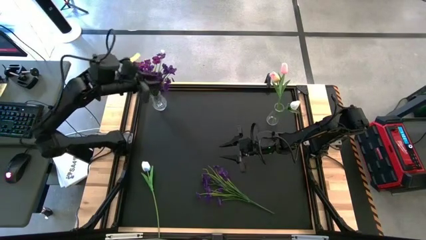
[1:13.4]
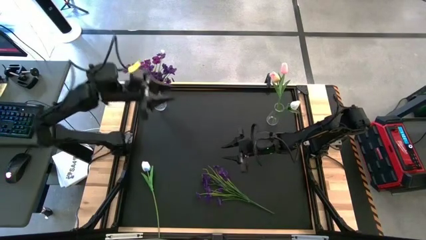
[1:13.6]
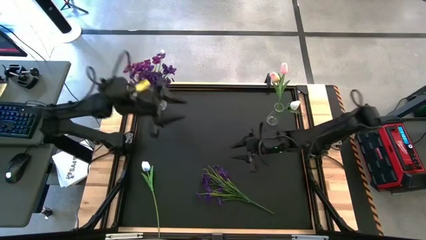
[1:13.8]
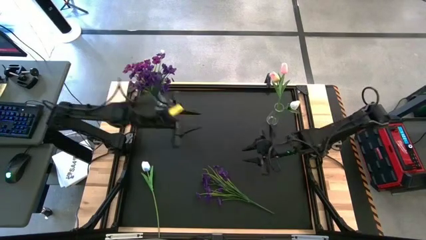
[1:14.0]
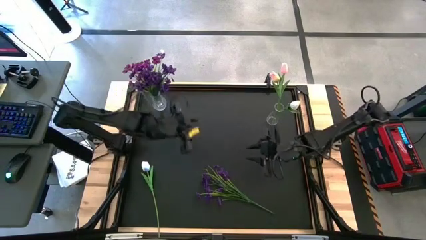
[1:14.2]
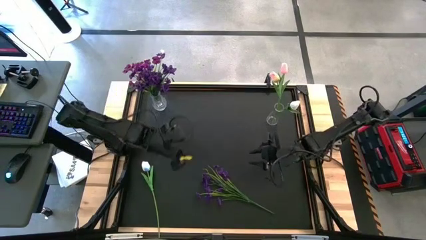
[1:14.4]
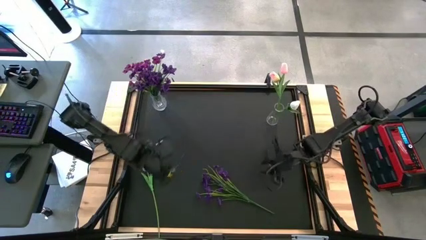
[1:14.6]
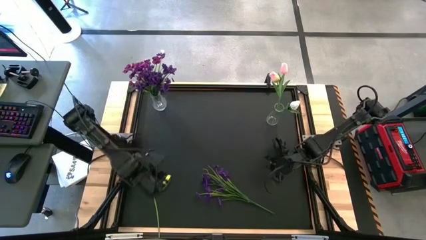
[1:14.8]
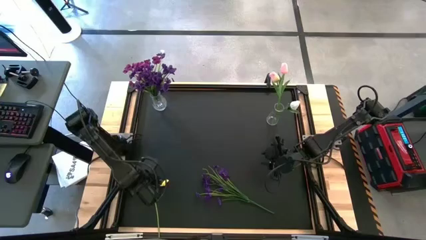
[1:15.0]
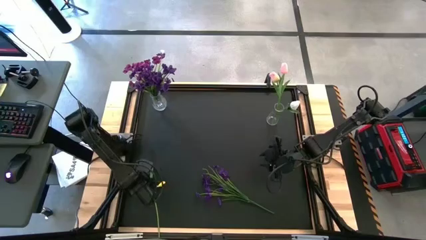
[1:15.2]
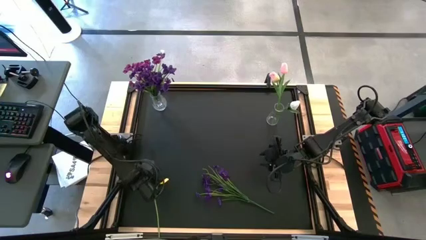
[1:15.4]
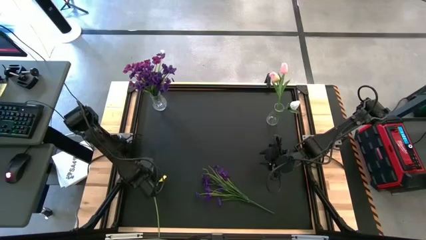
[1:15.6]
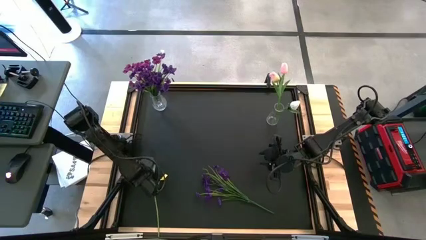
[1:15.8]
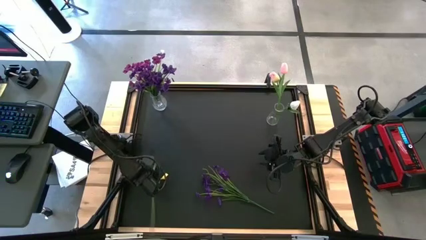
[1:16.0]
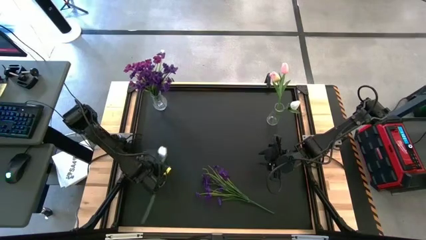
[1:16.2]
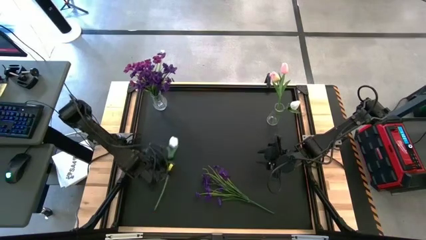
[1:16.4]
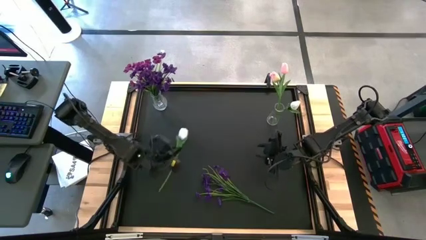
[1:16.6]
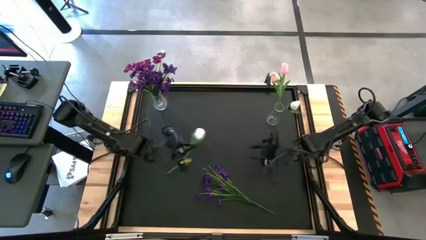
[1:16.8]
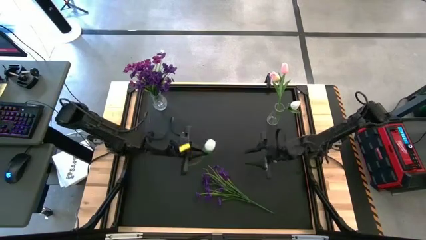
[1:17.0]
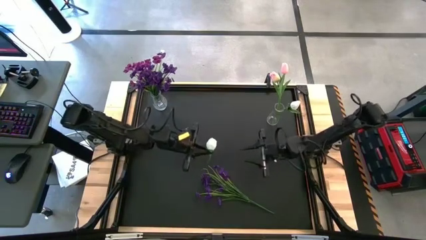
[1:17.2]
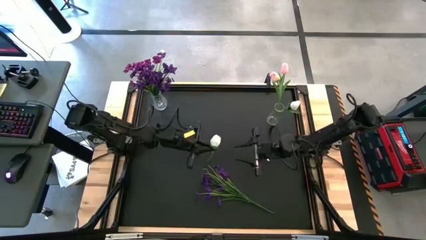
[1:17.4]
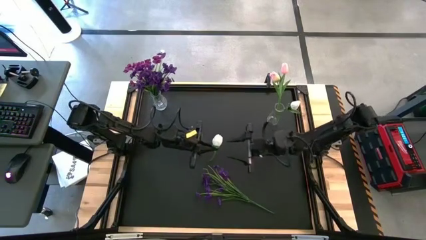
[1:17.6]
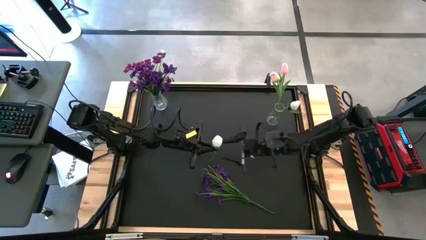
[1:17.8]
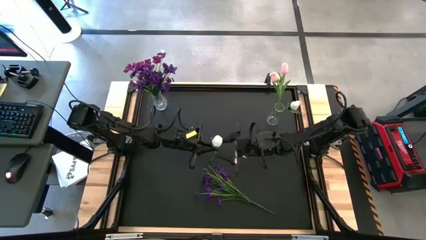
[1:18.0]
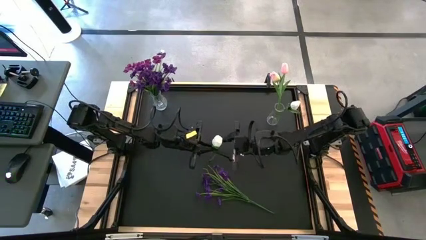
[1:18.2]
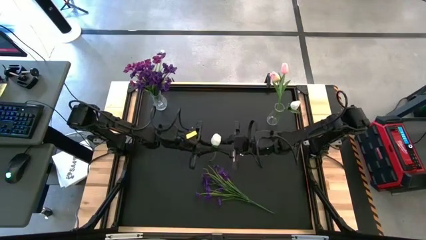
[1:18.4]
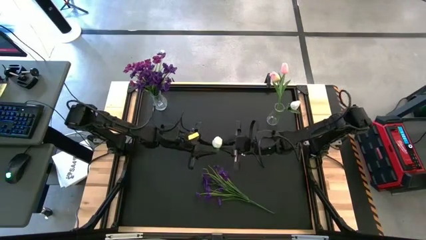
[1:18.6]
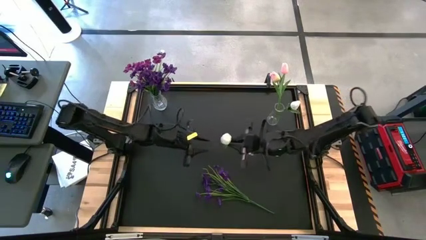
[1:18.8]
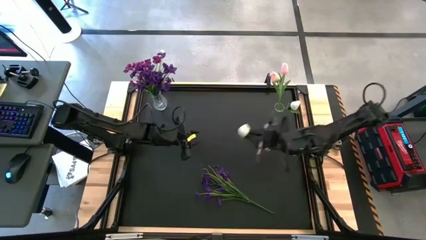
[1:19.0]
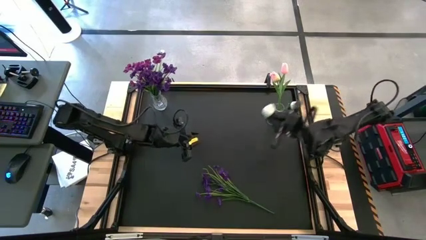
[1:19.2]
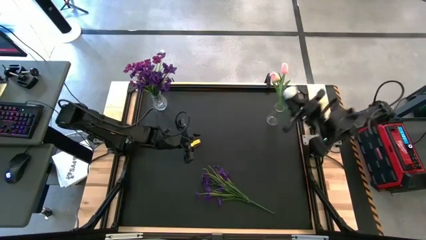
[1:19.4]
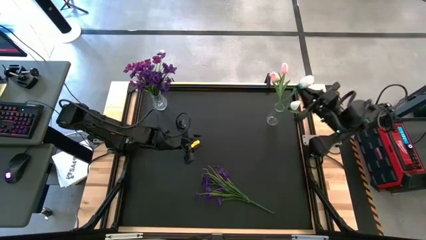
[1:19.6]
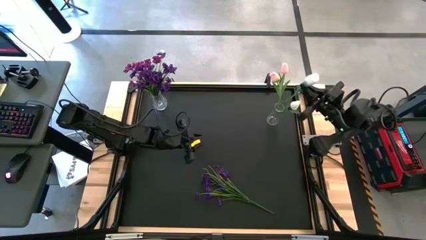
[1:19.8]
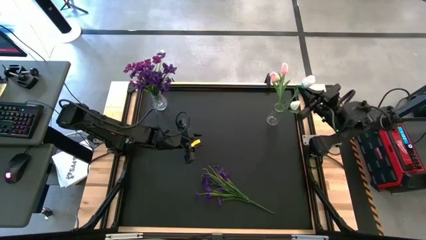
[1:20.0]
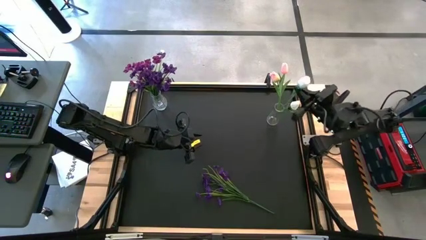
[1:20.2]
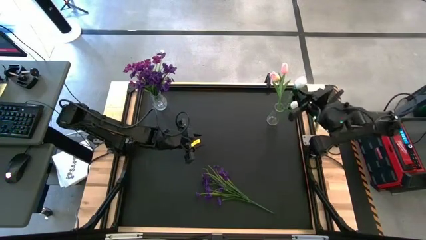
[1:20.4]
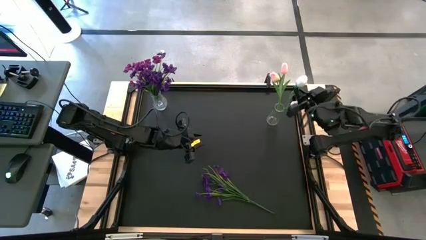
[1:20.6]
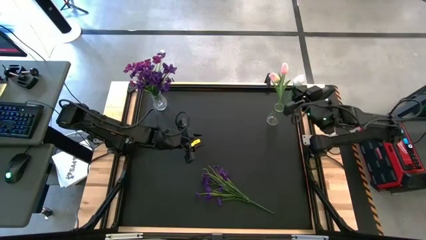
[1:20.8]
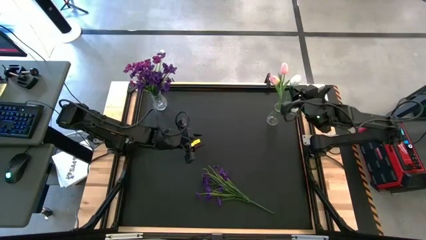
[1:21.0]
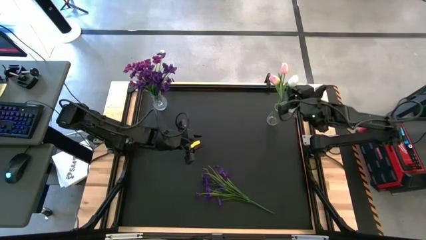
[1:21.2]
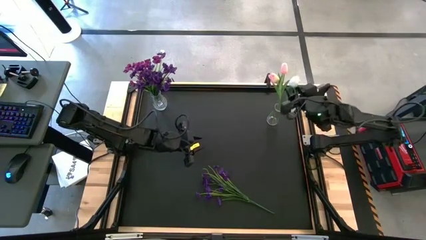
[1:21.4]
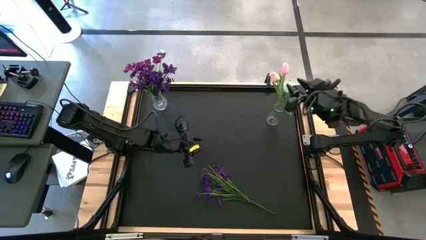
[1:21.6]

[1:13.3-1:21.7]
Task: Sort flowers into vase by color
Put the white tulip into the right transparent vase

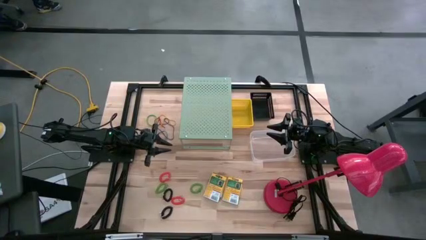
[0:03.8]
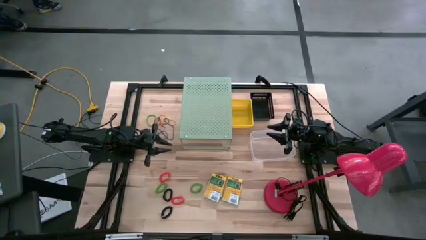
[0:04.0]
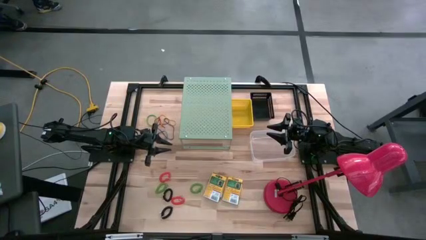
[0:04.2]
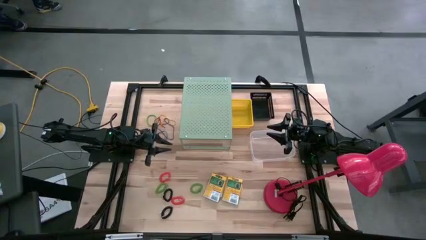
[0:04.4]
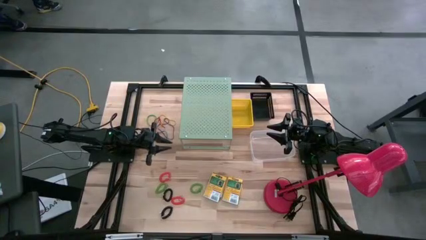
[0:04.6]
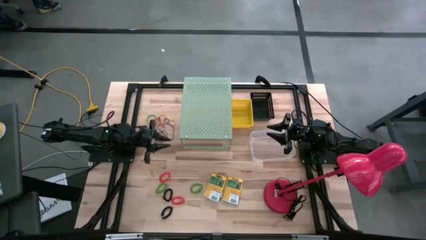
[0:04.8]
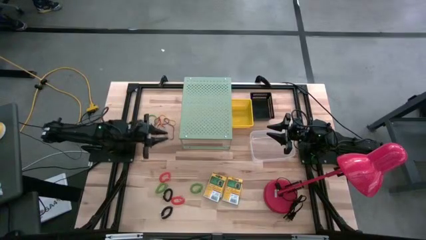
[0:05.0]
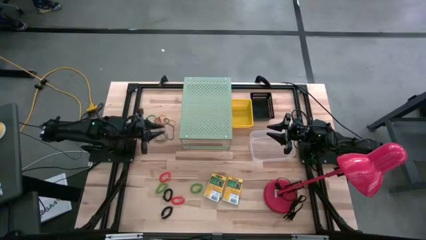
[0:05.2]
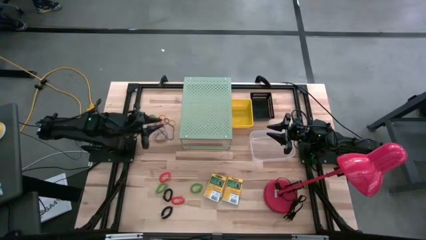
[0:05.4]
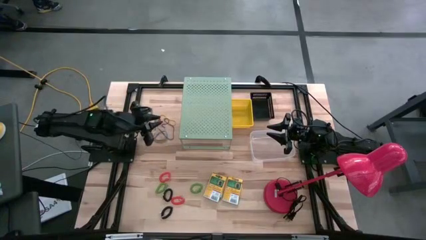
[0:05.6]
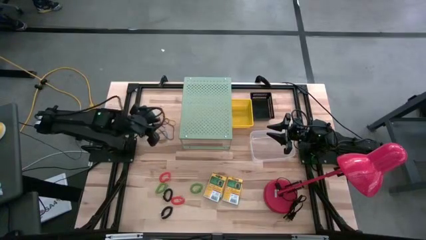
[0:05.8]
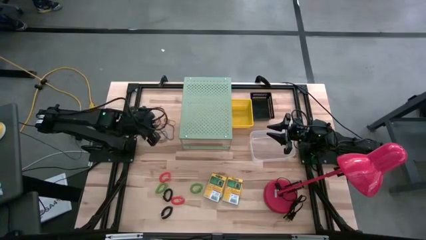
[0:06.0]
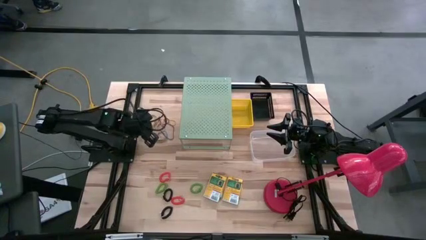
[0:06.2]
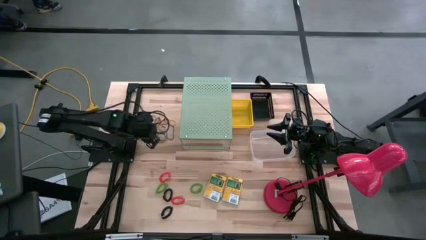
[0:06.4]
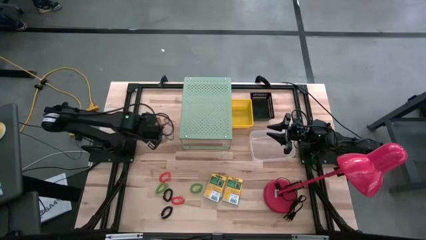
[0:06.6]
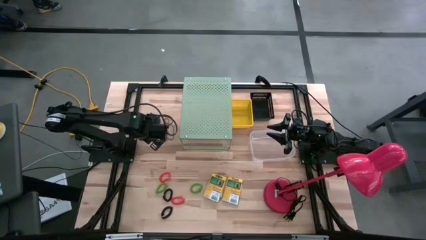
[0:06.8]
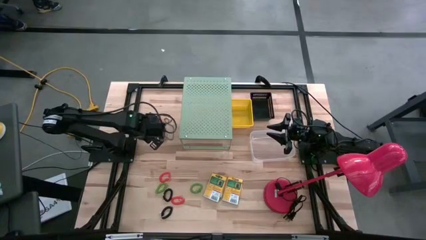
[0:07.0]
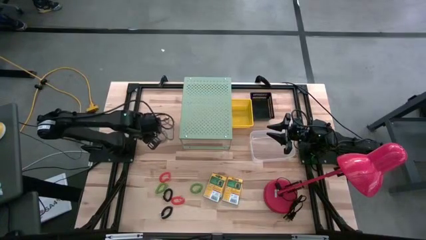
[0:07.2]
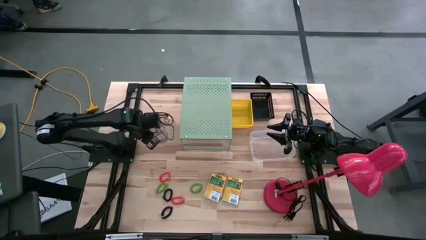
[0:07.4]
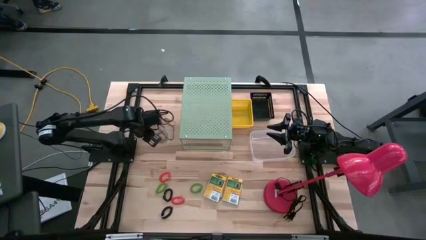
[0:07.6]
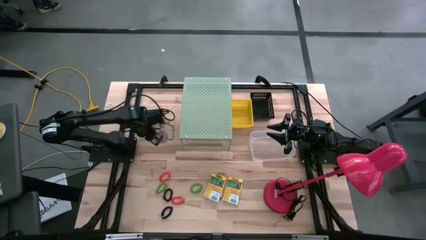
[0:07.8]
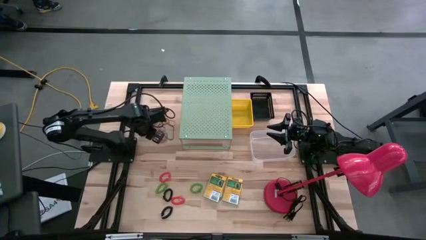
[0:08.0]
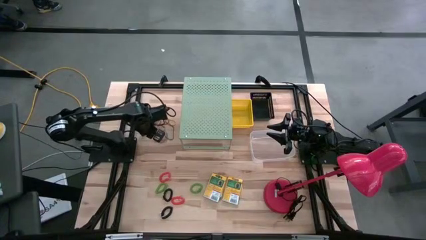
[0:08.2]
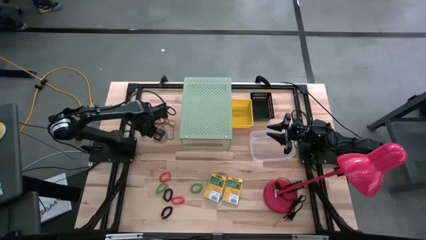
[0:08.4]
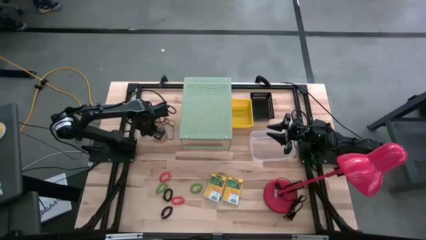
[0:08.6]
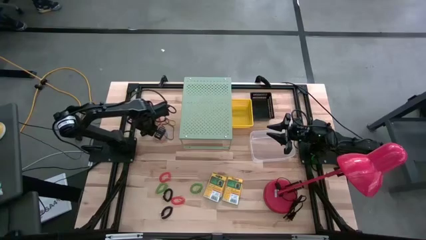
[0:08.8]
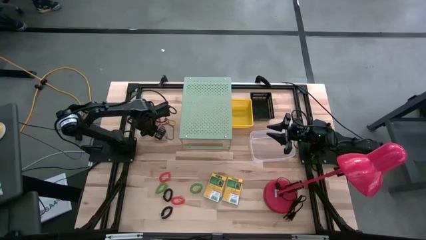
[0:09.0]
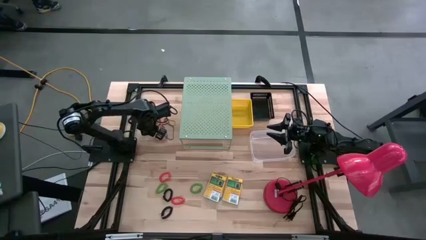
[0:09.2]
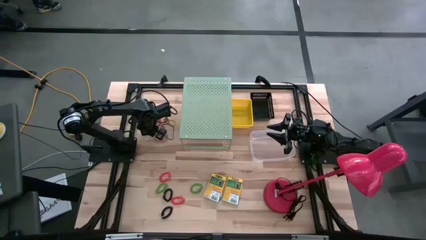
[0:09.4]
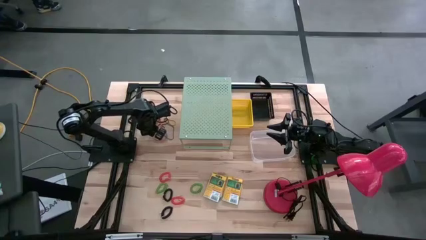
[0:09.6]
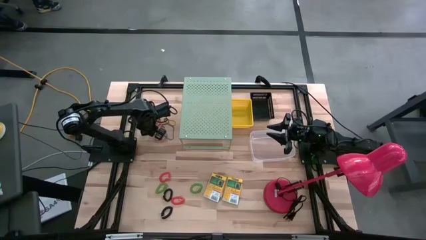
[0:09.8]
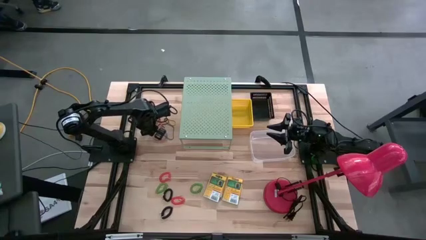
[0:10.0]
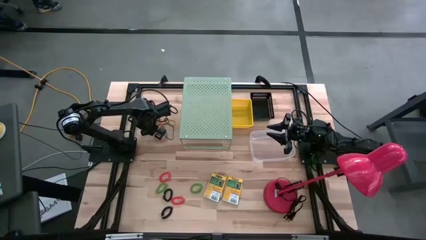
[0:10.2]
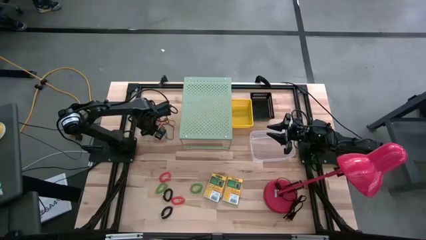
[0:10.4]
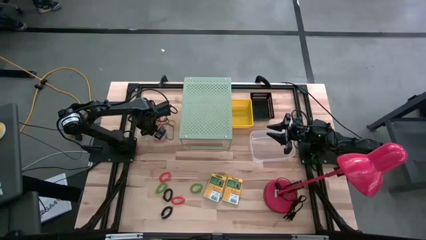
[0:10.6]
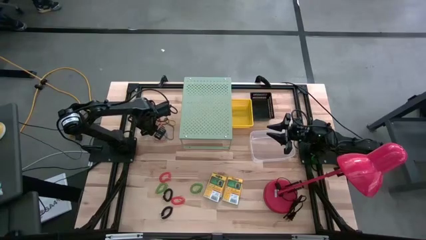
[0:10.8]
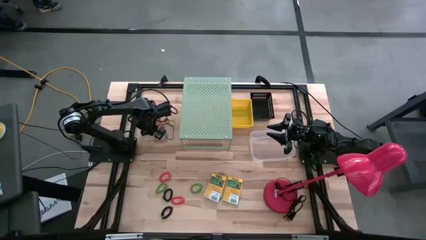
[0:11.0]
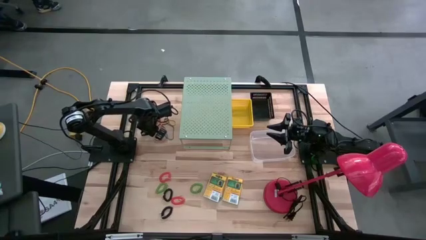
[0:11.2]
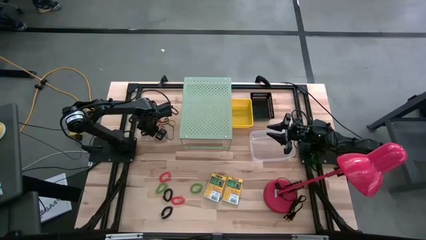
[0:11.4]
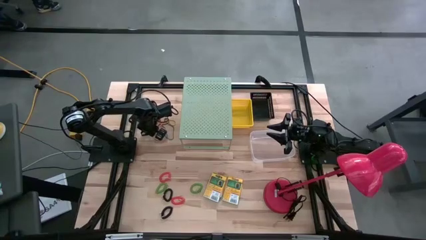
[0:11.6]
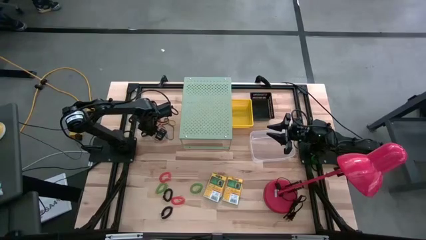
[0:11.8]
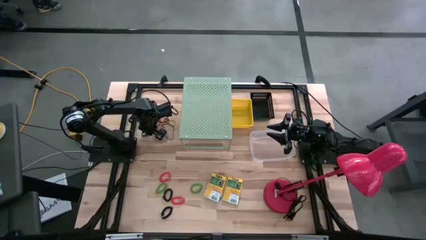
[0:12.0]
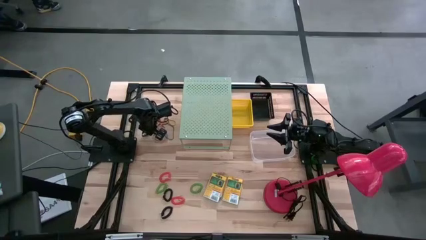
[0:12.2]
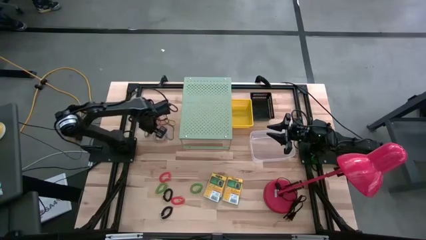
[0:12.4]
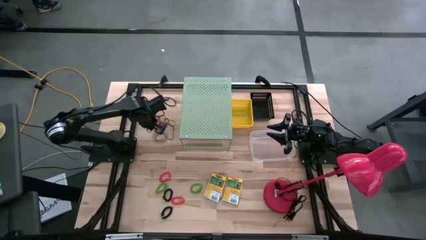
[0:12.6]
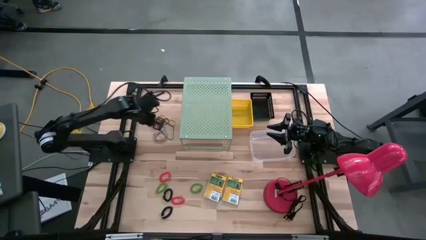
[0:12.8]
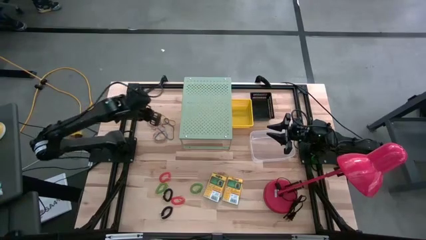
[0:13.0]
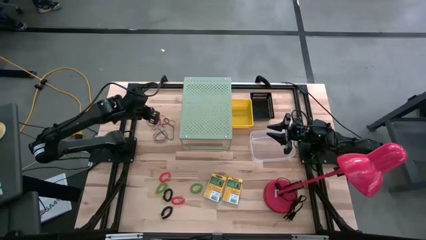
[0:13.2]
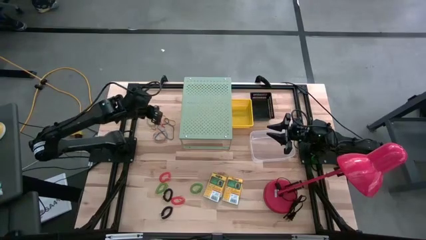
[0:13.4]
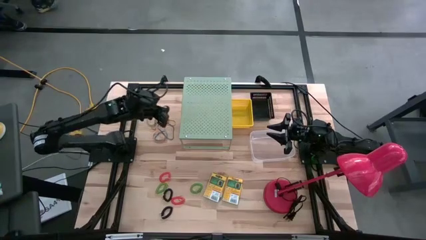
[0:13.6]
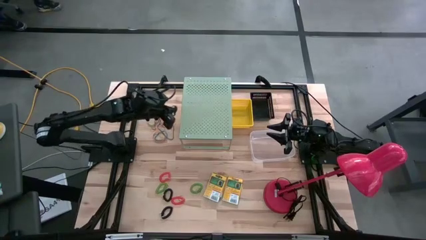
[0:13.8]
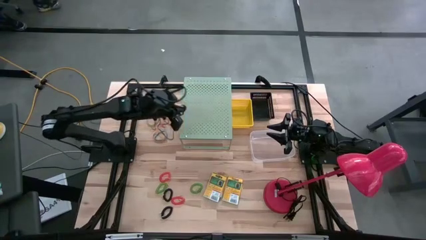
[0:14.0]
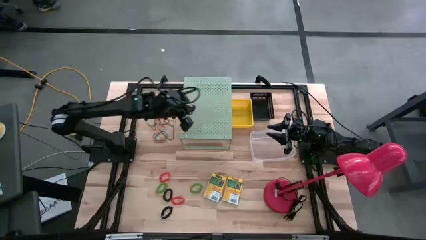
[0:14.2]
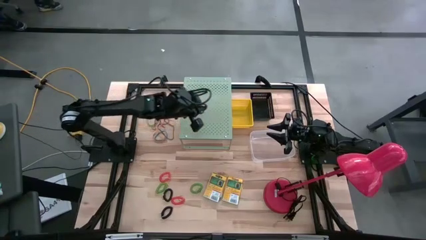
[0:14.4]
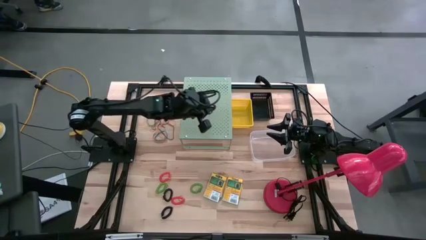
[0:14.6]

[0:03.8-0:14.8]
Task: Pick & Place Office Desk Supplies
Put the black rubber band into the black bin
